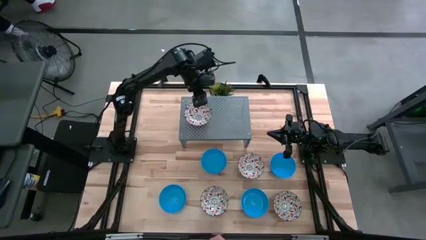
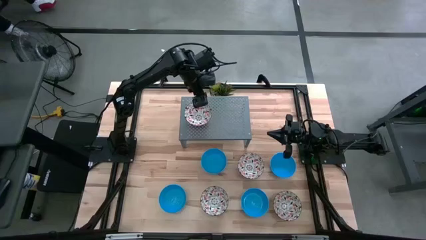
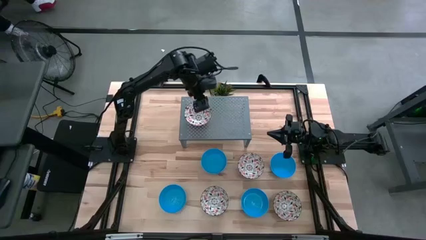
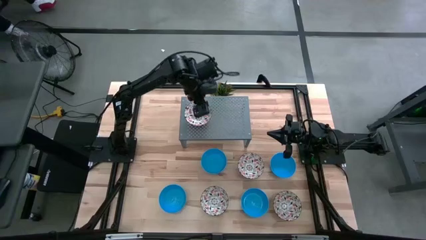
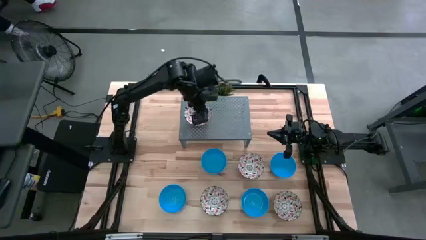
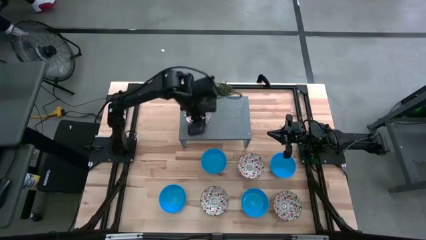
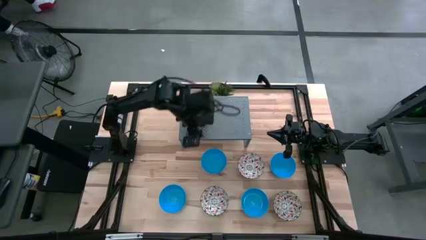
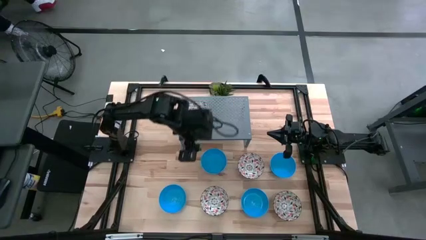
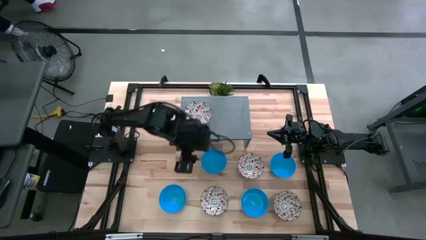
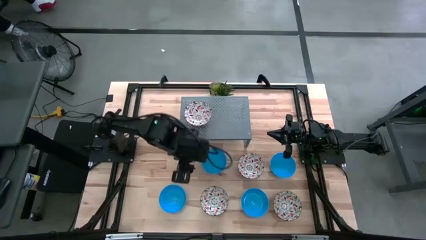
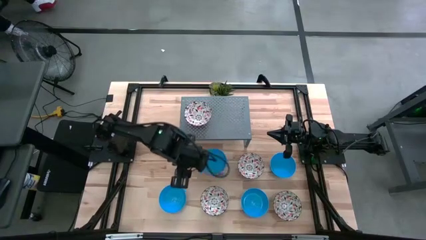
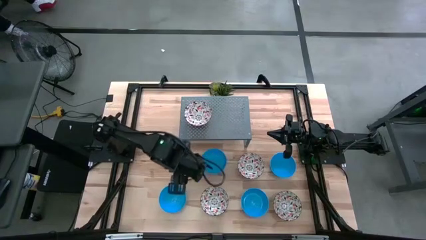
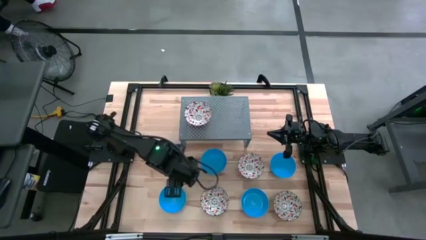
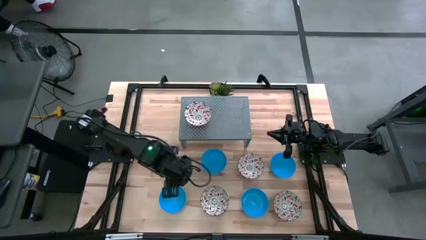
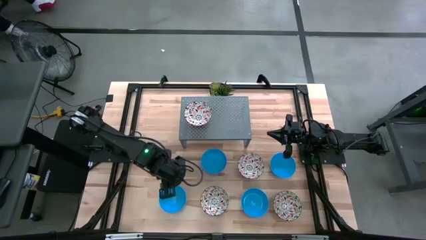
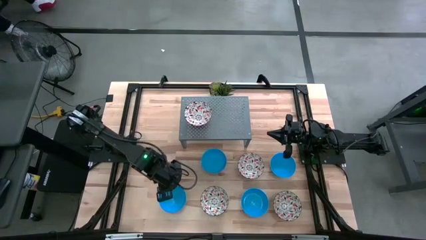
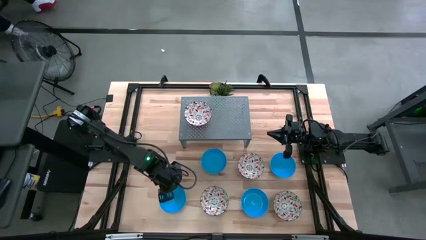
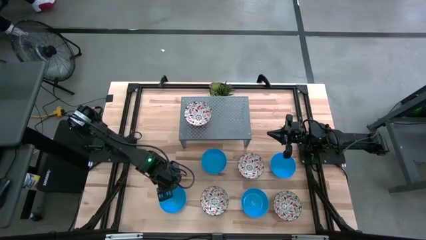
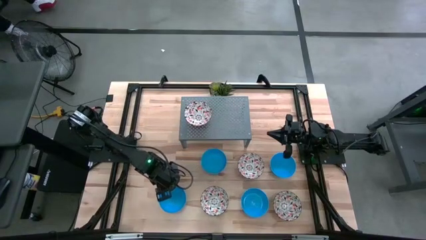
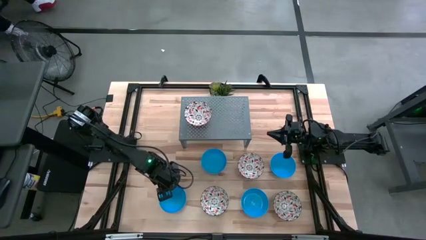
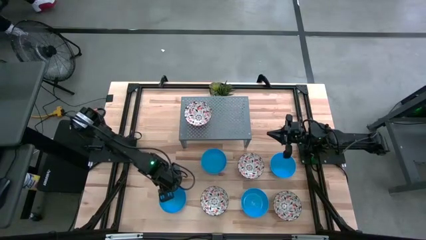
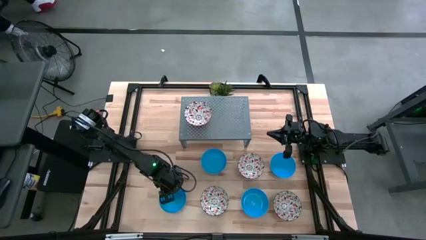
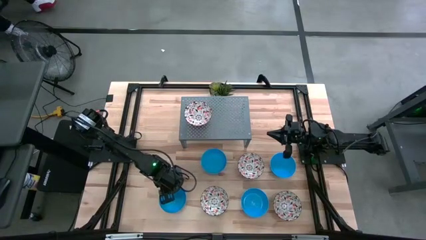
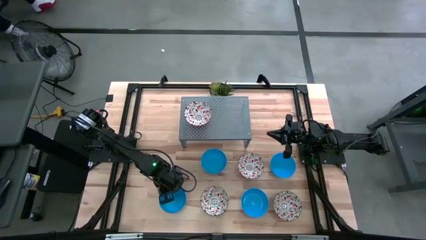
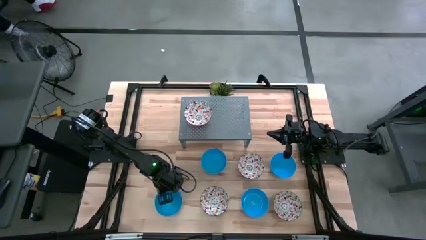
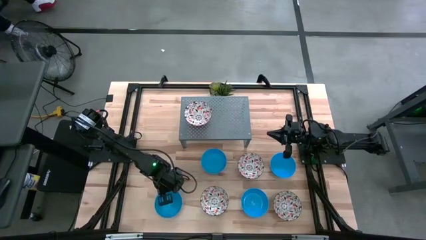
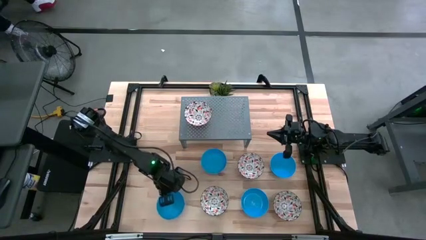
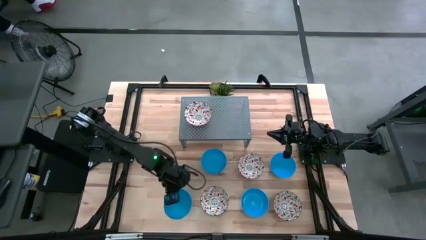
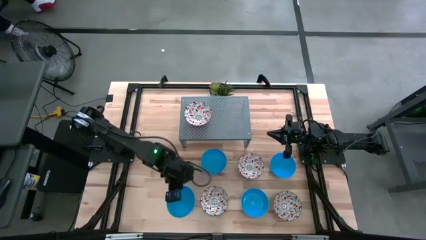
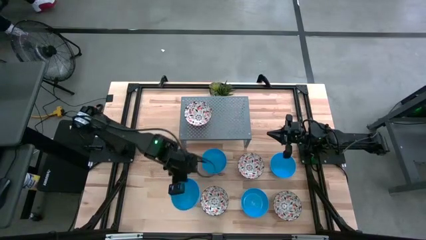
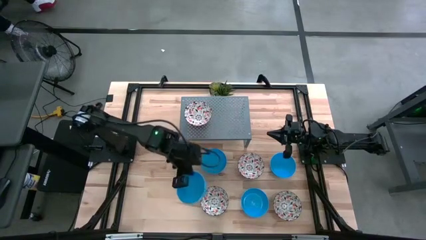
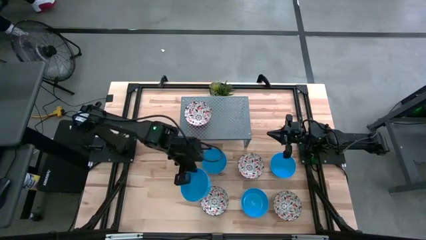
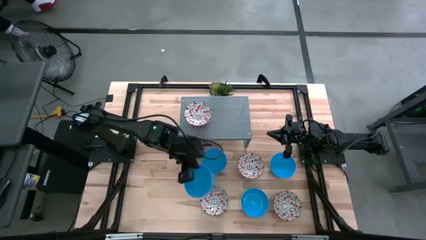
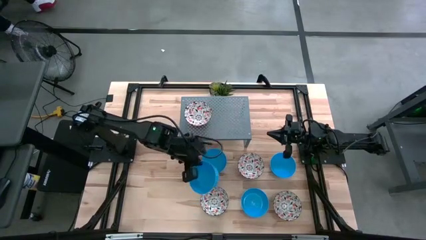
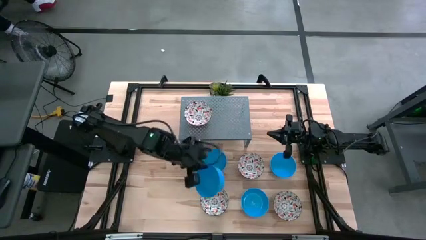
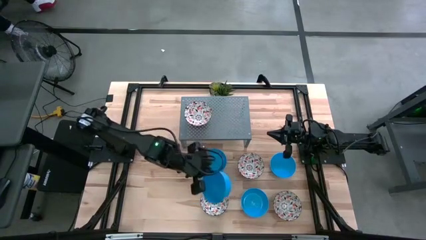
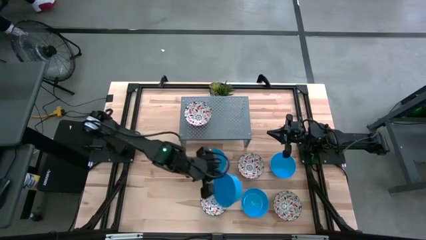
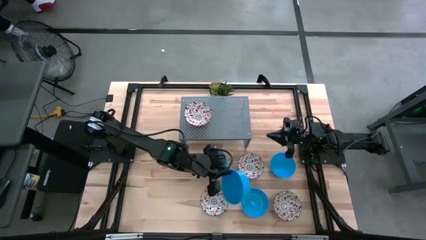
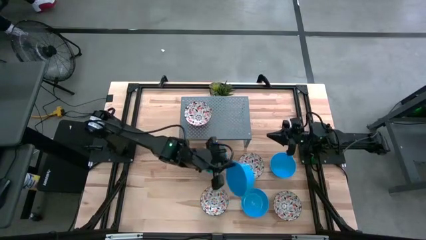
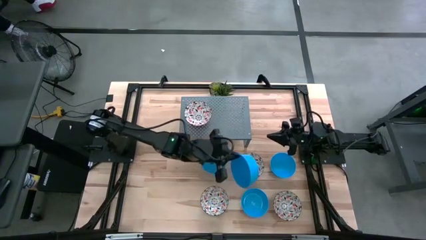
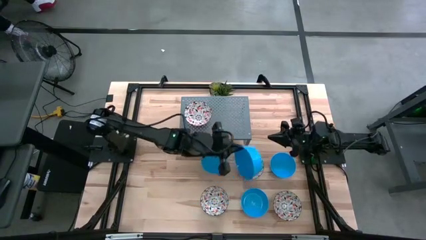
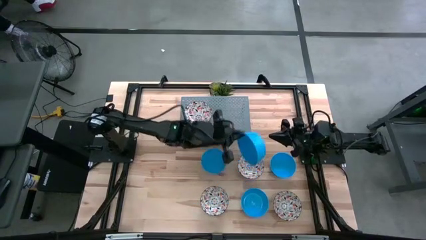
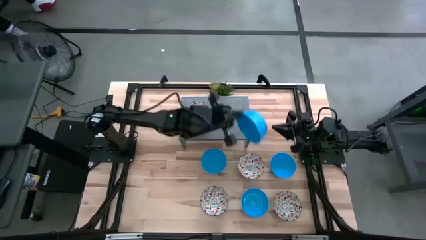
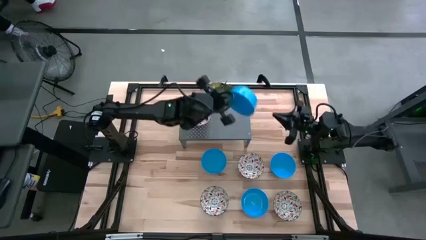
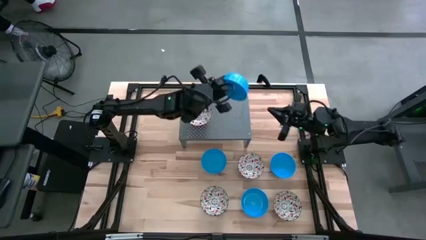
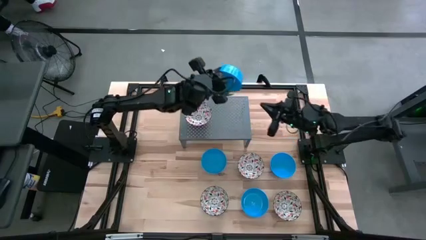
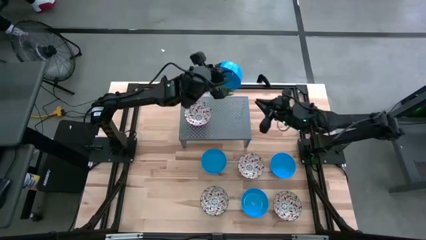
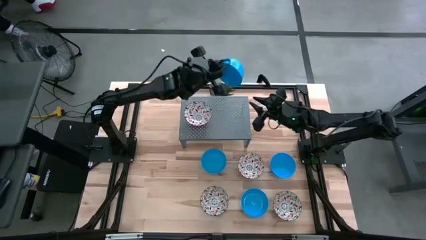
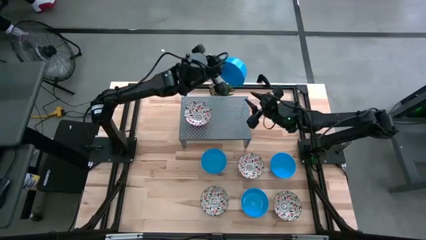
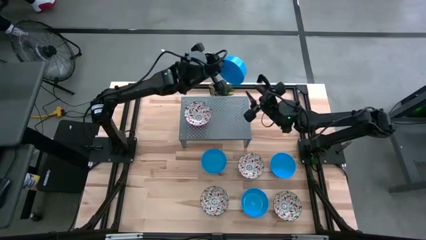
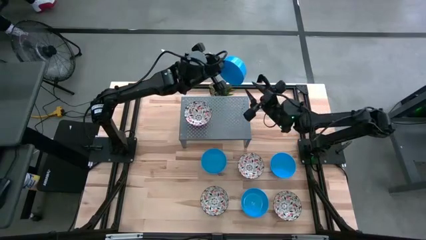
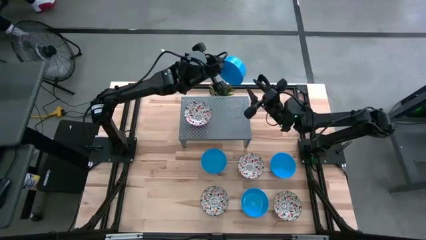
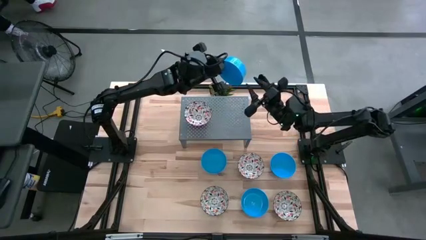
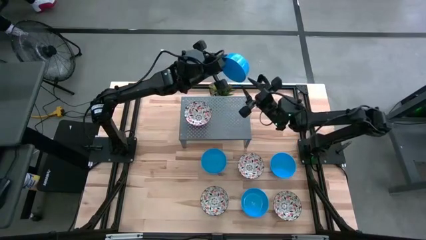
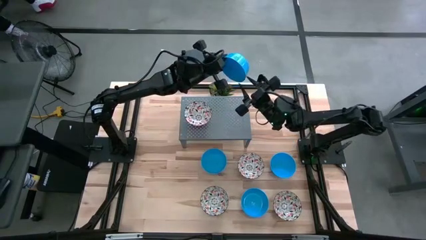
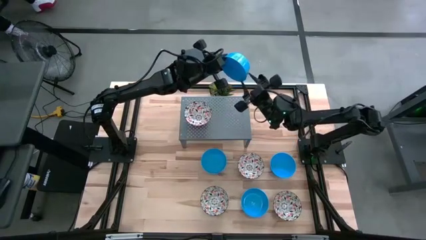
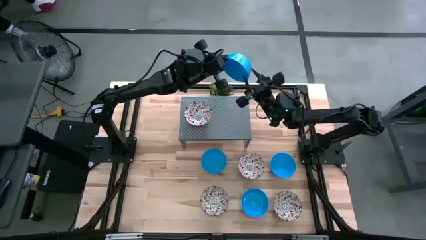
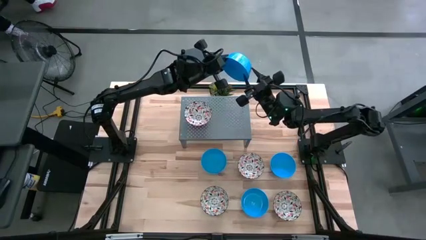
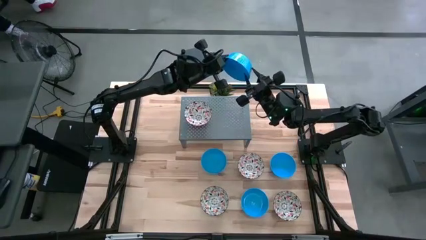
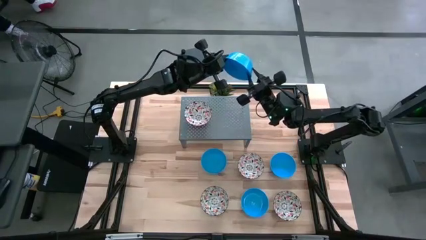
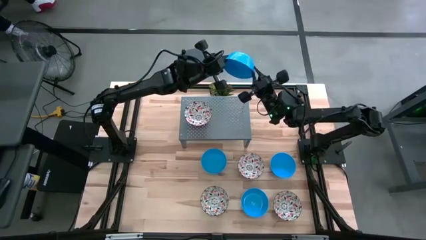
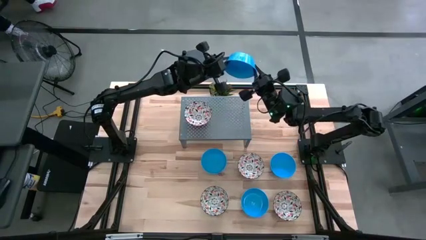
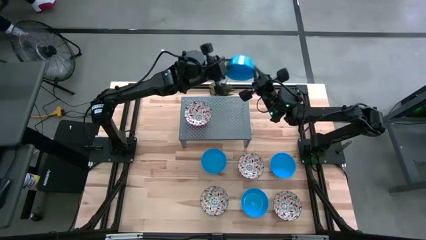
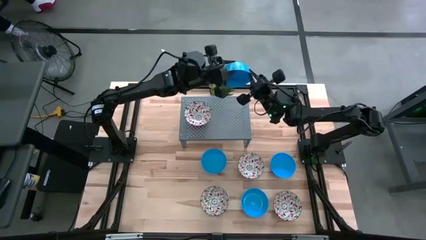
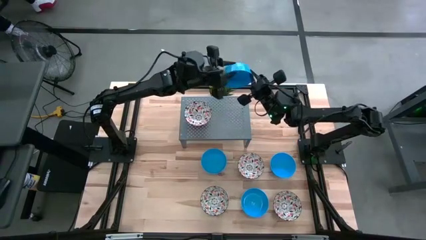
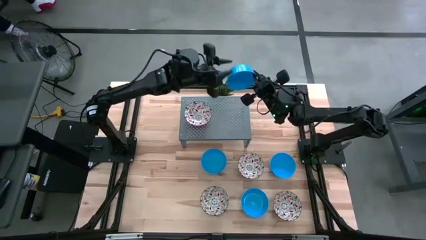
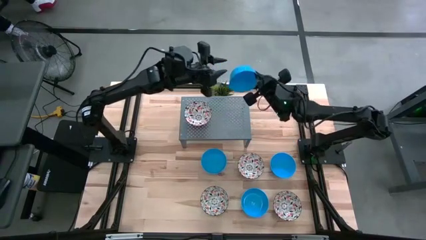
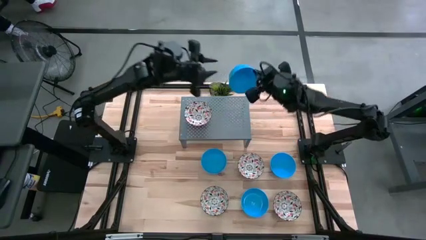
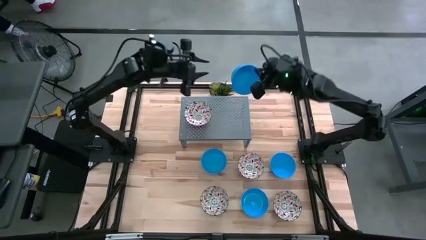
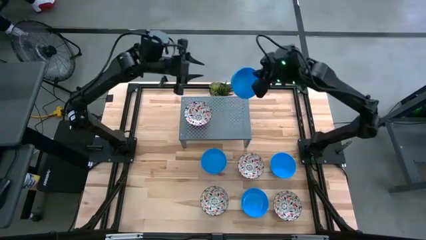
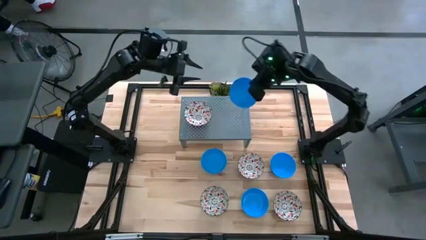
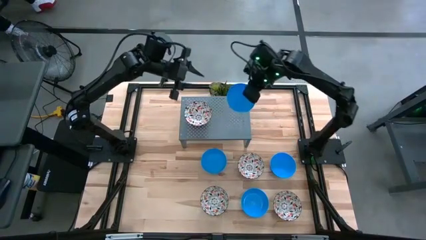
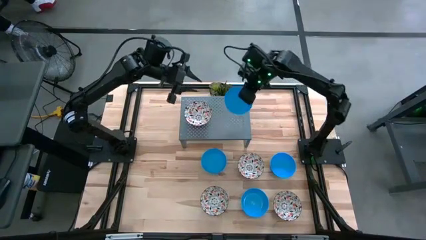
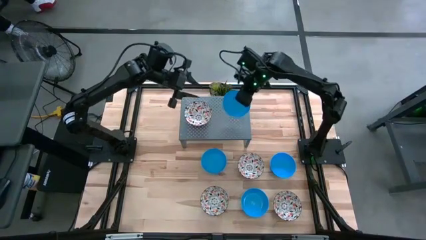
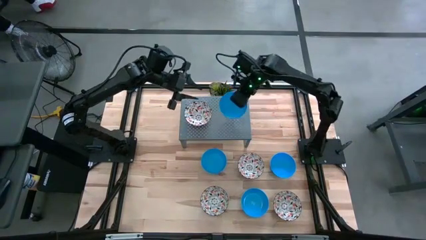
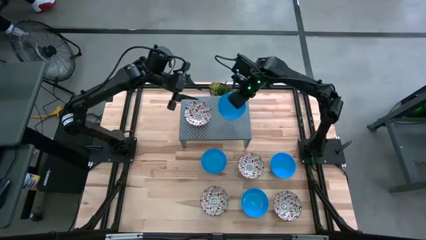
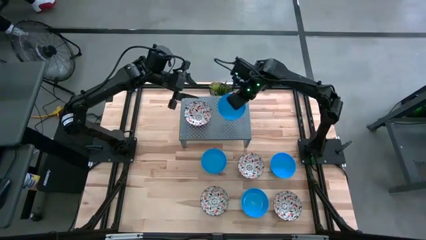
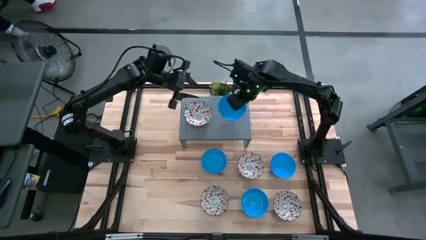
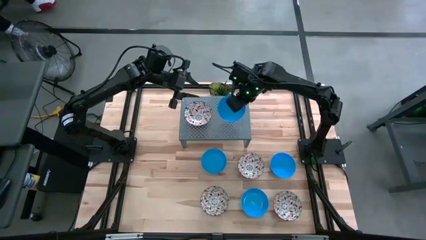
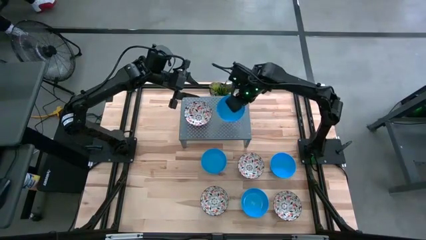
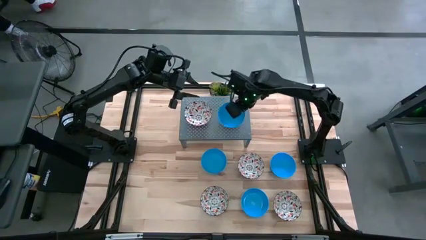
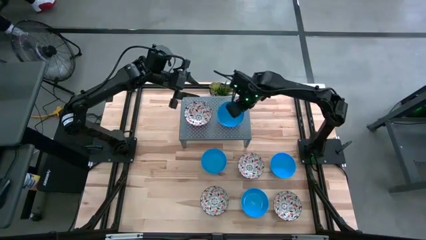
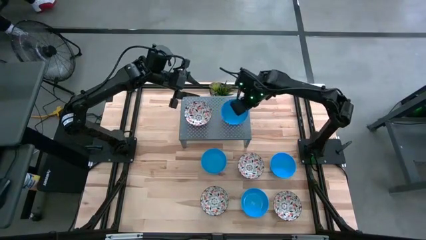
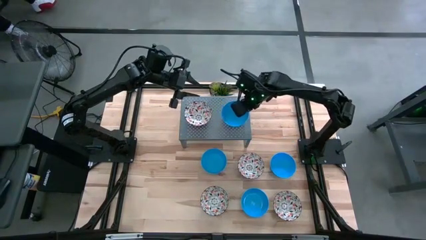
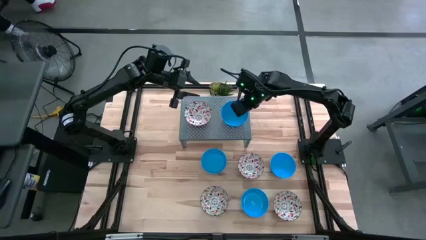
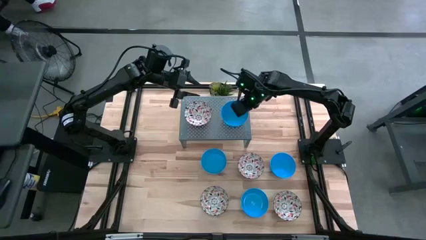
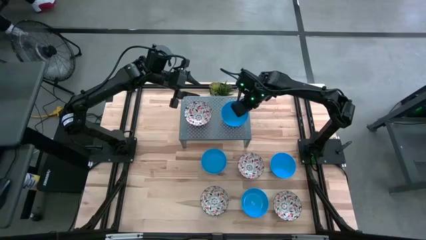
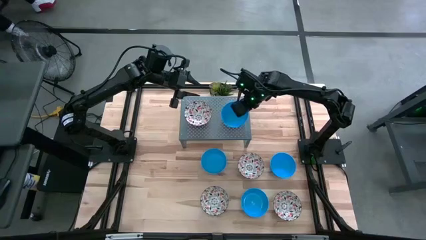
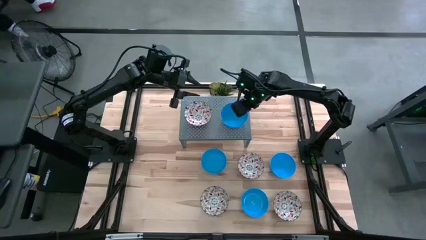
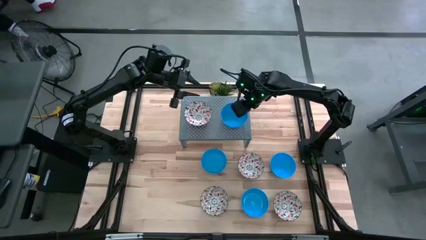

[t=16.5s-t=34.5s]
Task: Pick & Place Mini bowls
Put the blue bowl on the shelf
